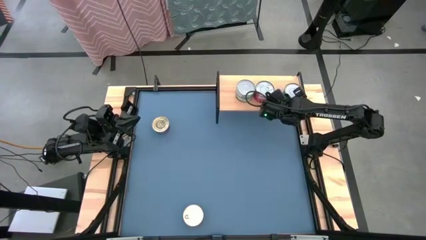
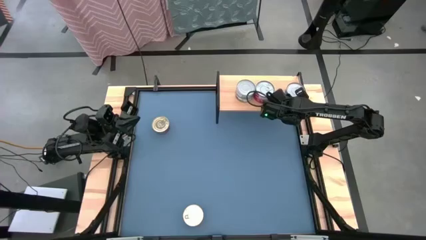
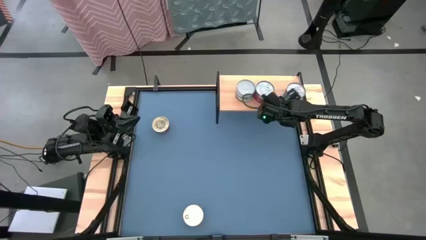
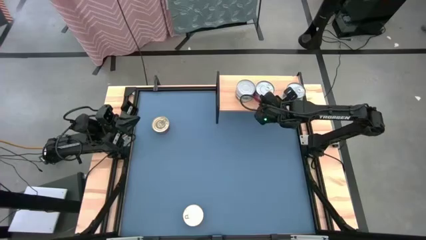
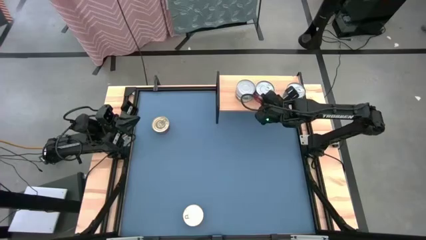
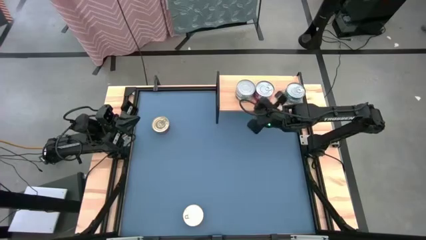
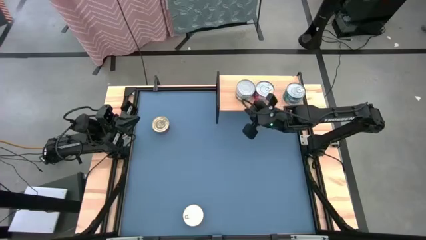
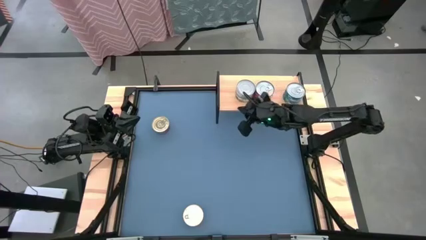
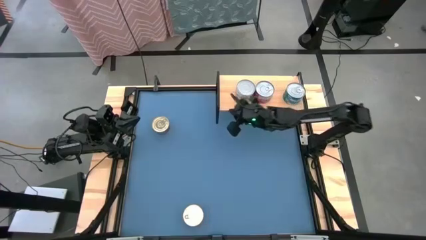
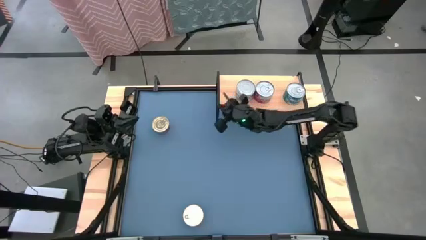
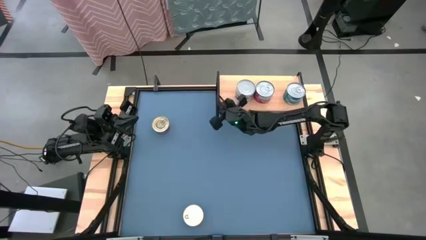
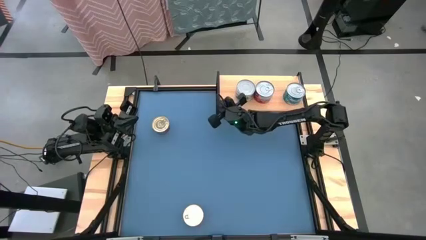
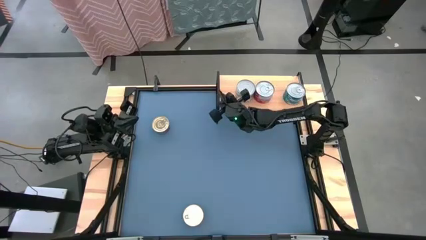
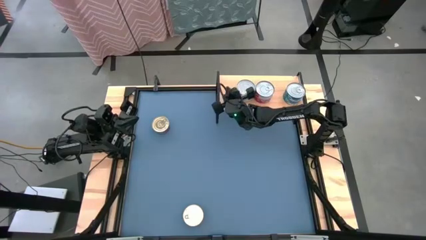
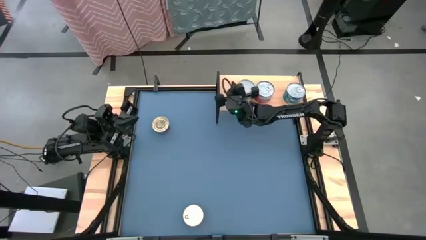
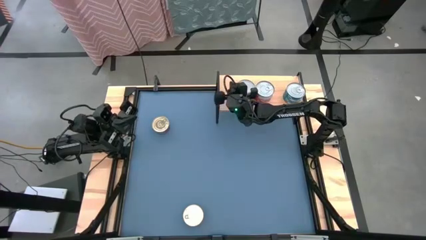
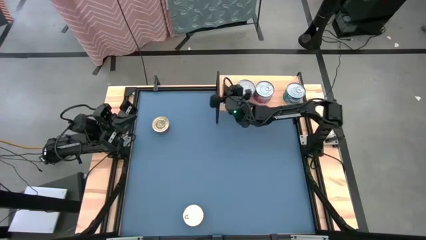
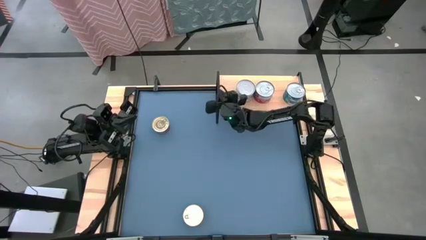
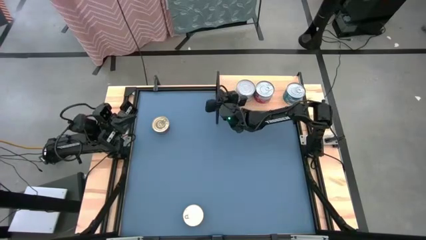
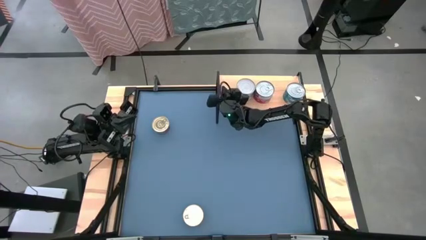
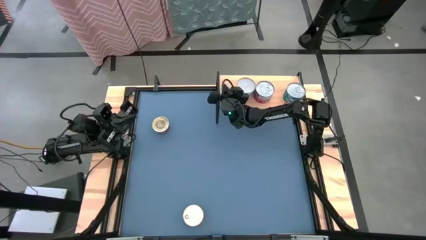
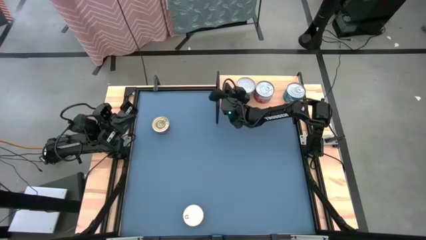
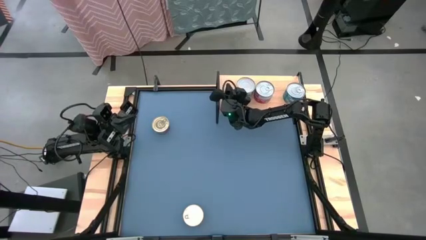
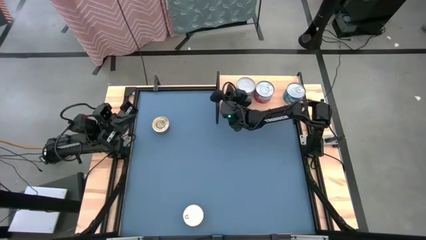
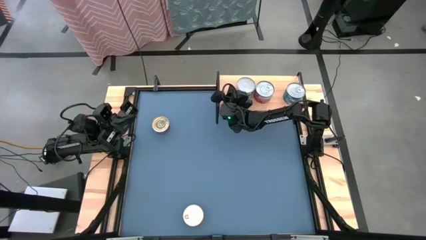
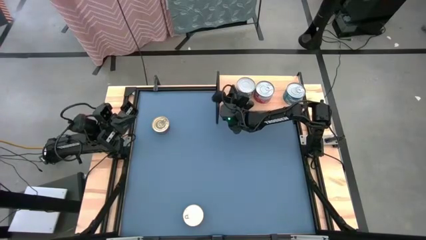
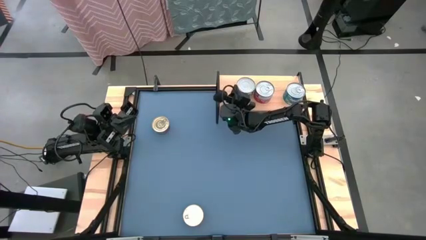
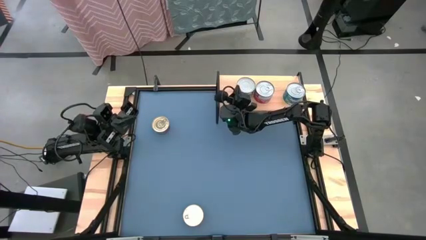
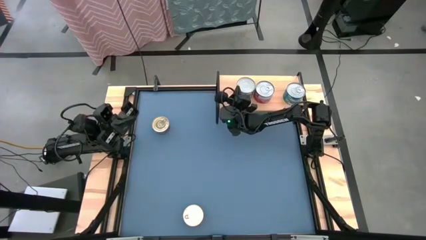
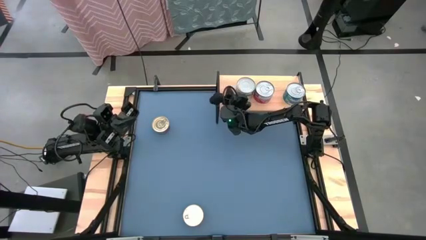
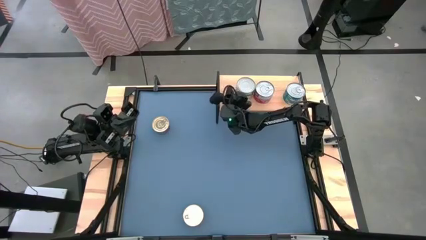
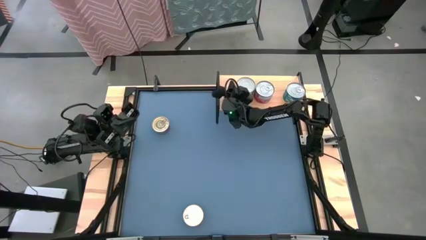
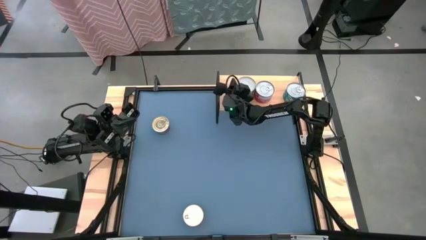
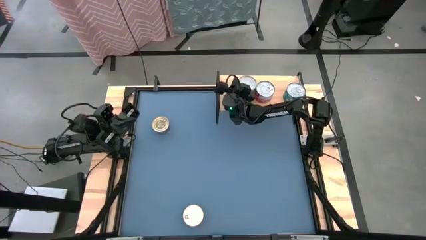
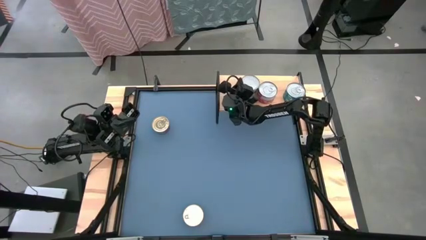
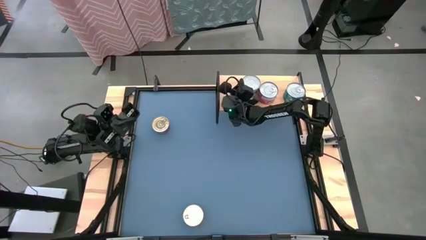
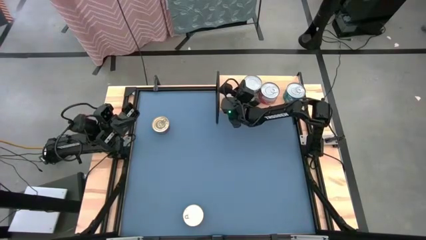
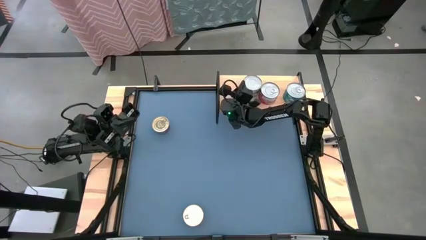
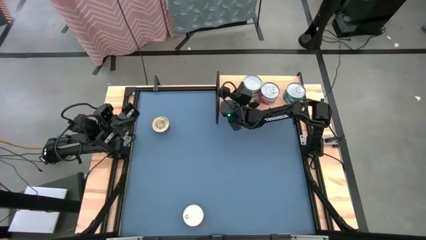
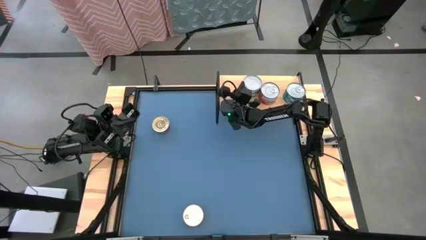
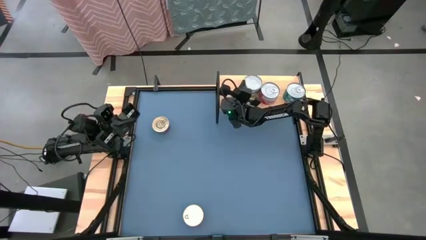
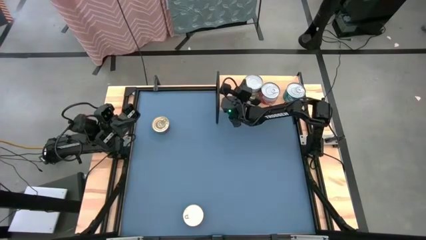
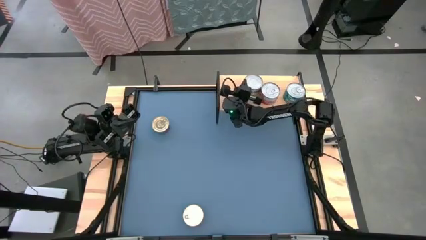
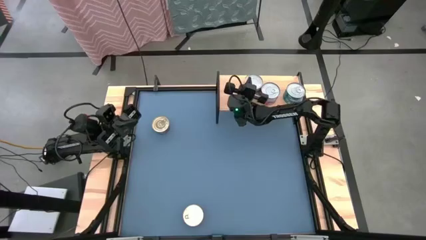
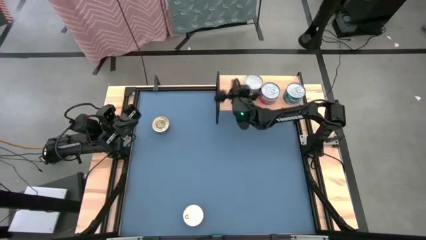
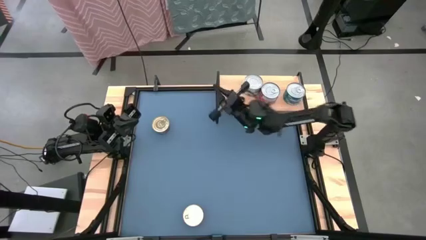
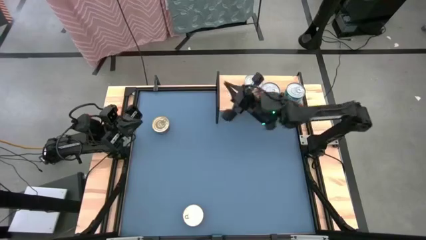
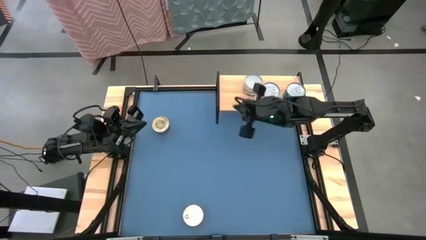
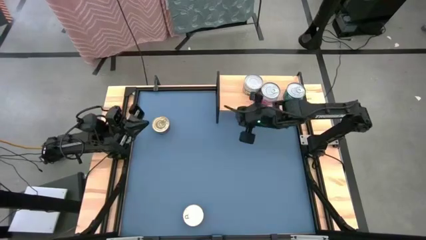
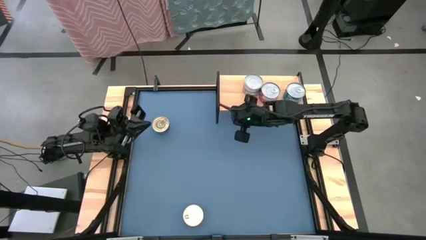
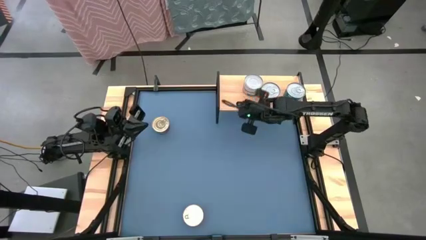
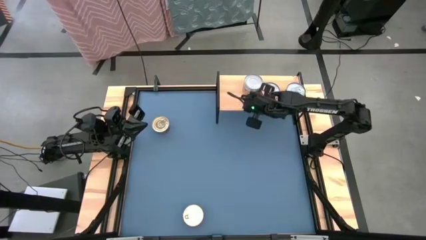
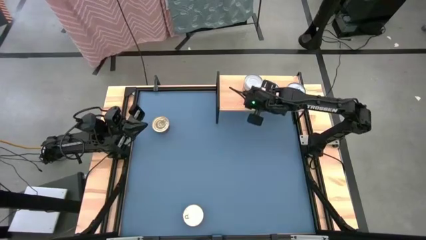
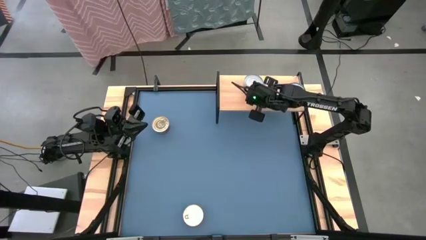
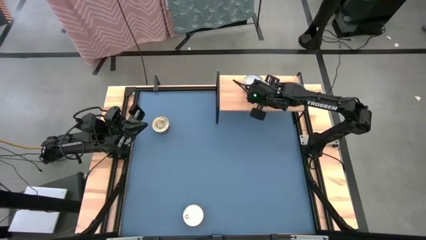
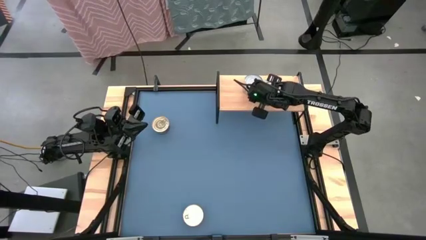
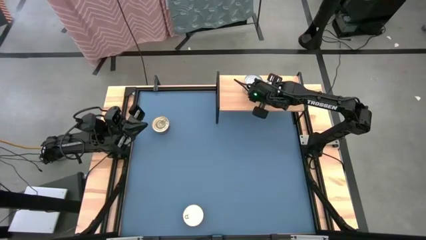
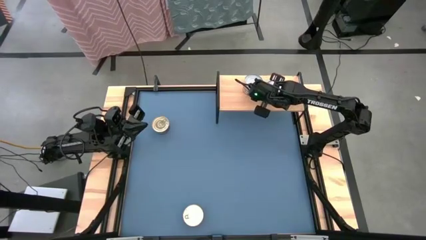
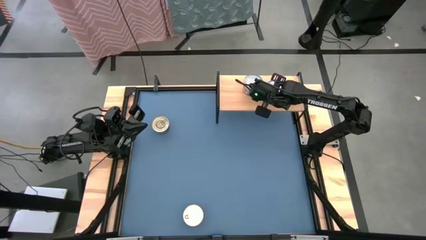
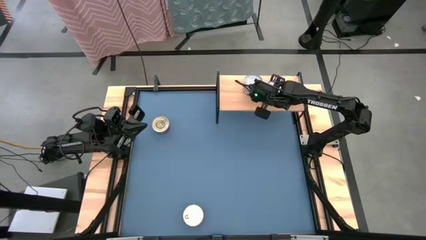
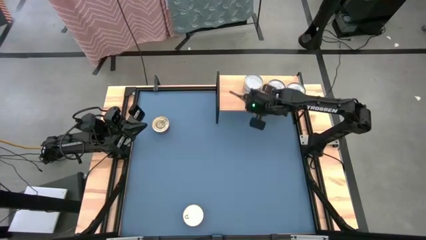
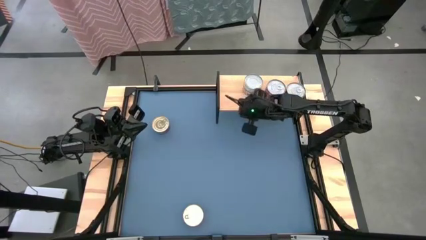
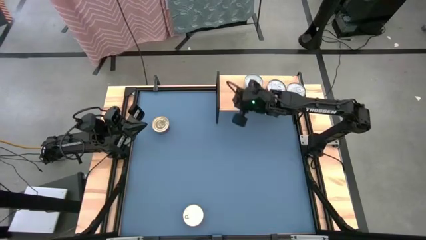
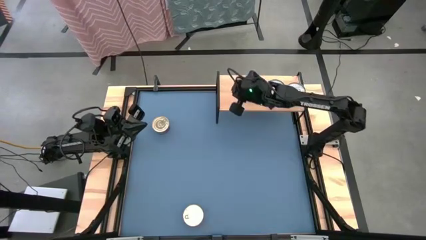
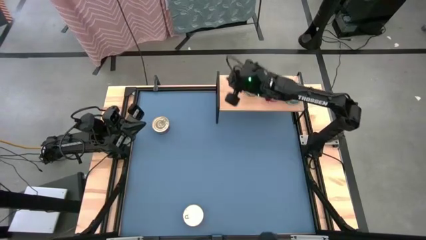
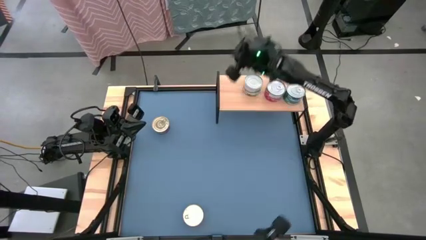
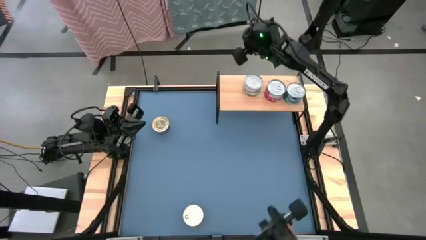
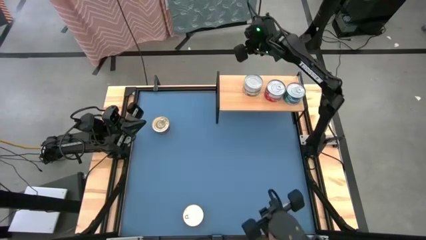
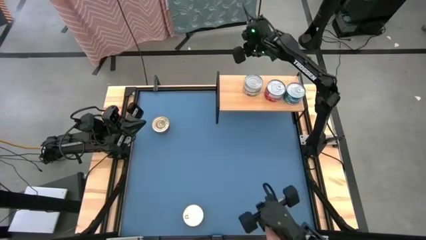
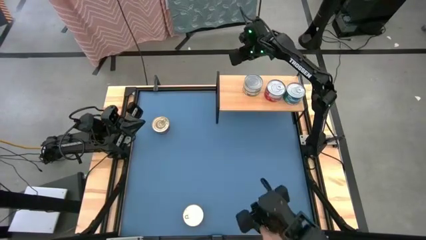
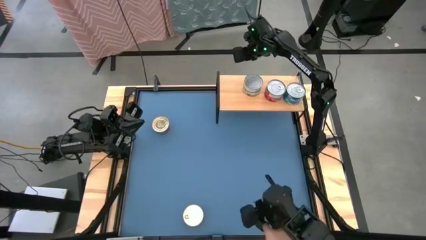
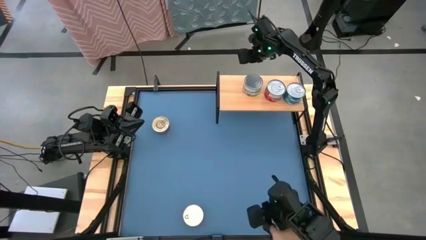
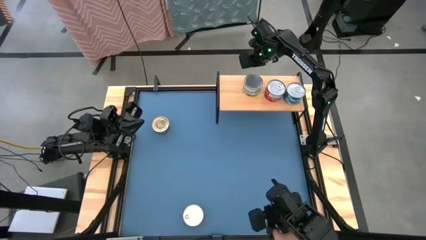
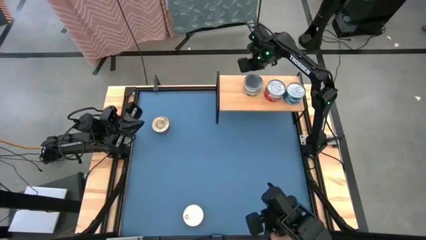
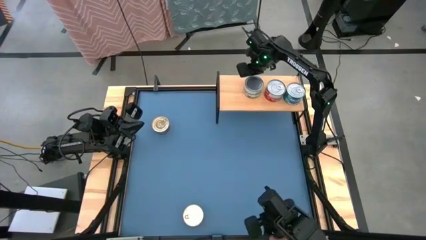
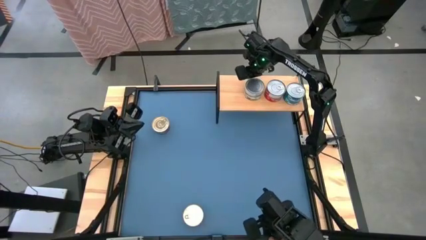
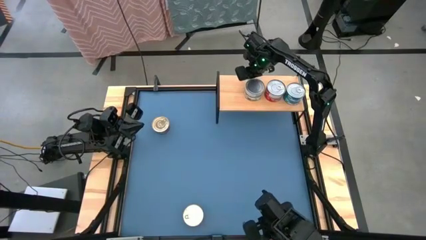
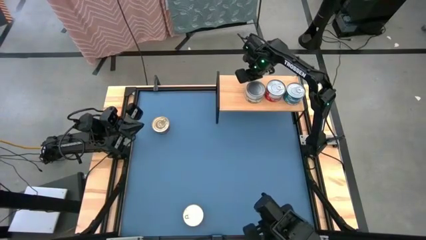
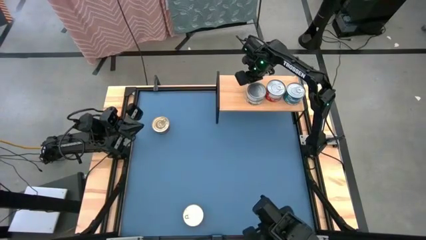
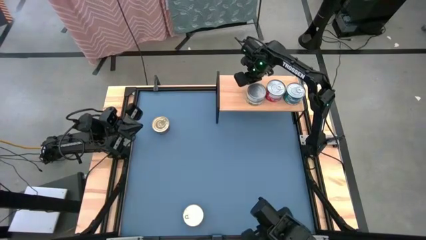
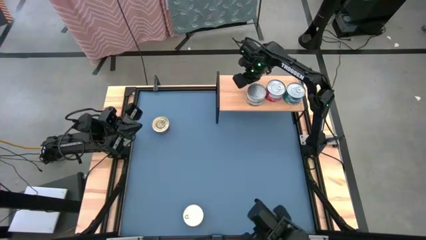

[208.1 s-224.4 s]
Task: Stack canned seafood by type on shelf
Adjust the stacked tuna cans on the shelf

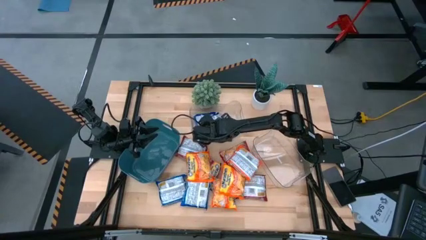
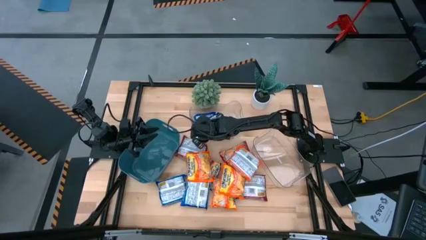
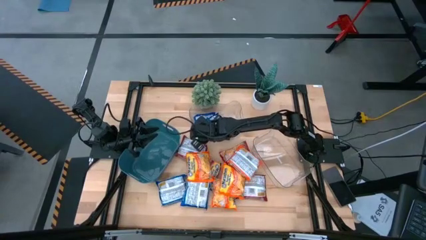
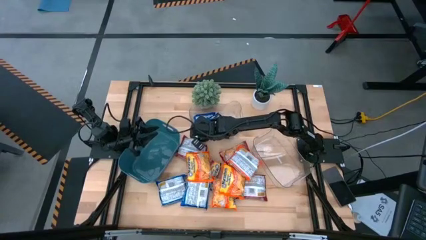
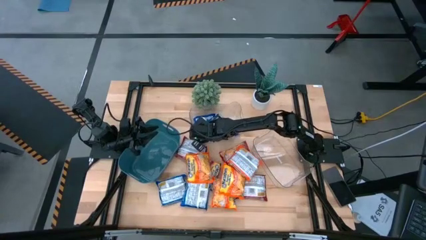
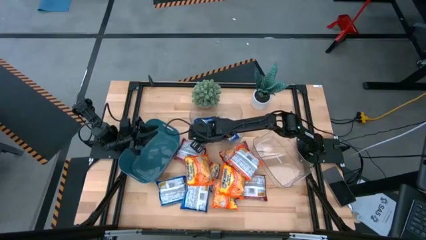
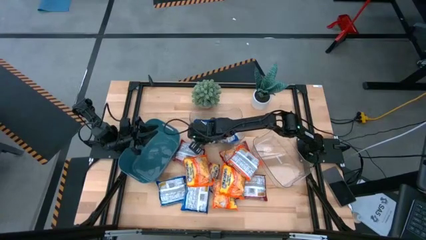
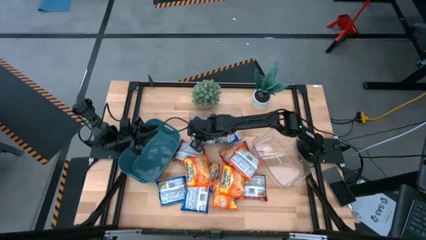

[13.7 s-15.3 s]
Task: Sort Maruchan noodles
Adjust the left blue noodle pack inside the left transparent bin

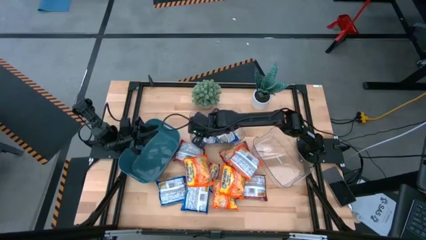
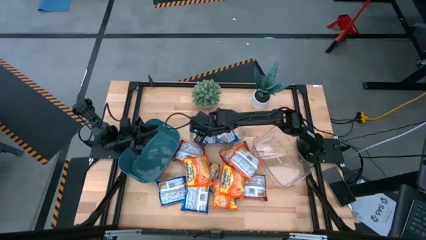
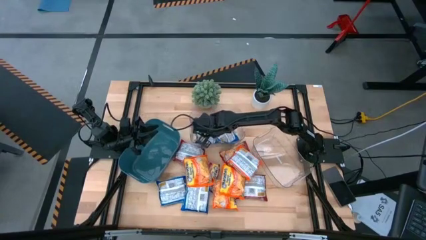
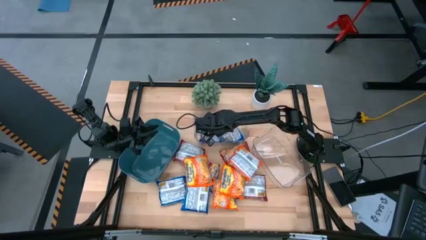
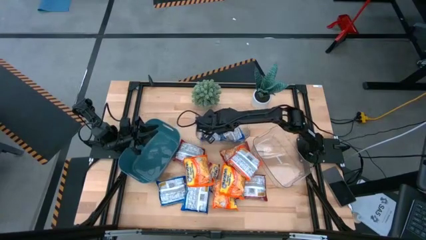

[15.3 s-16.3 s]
Adjust the right blue noodle pack inside the left transparent bin
